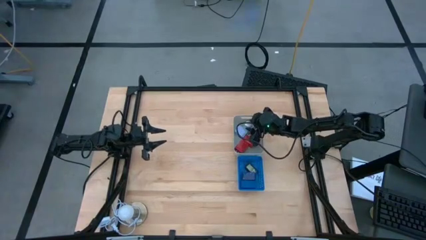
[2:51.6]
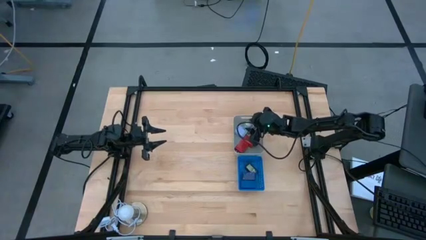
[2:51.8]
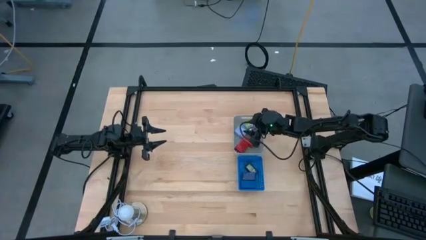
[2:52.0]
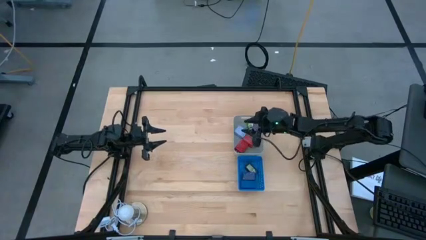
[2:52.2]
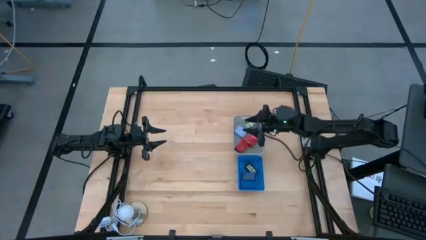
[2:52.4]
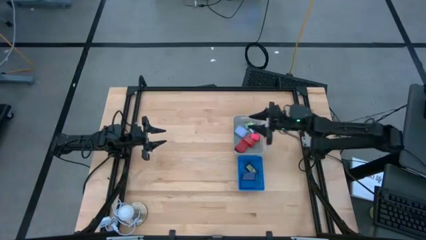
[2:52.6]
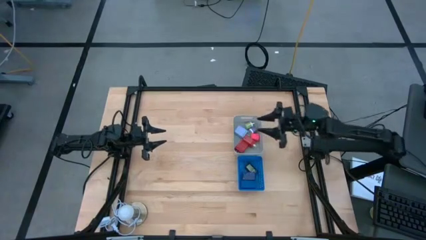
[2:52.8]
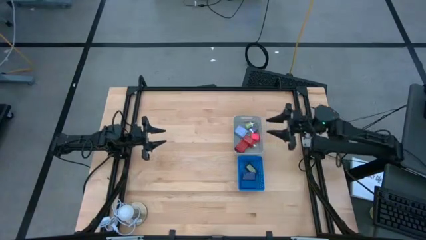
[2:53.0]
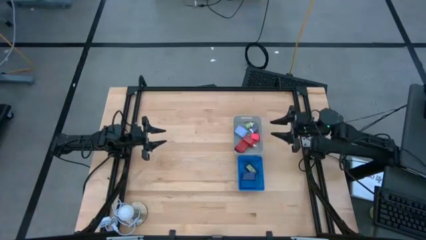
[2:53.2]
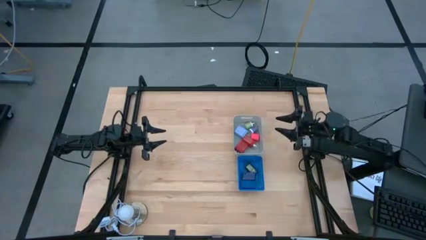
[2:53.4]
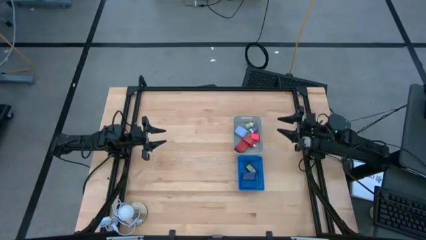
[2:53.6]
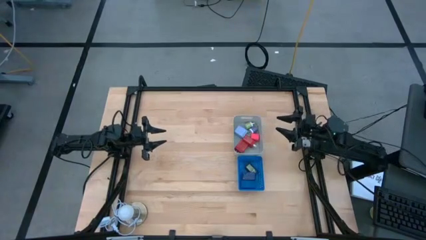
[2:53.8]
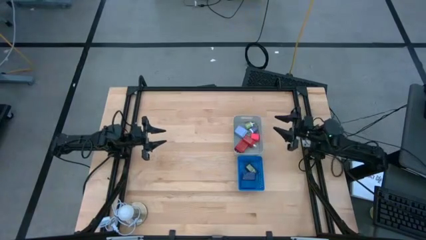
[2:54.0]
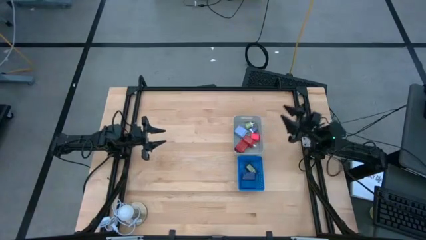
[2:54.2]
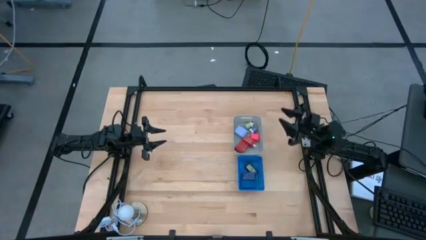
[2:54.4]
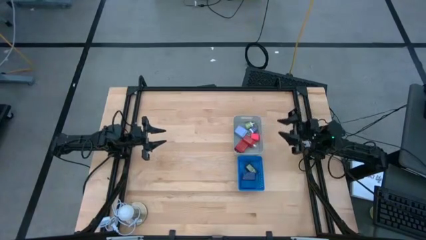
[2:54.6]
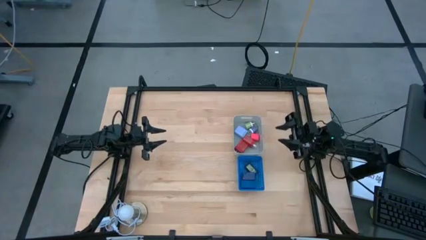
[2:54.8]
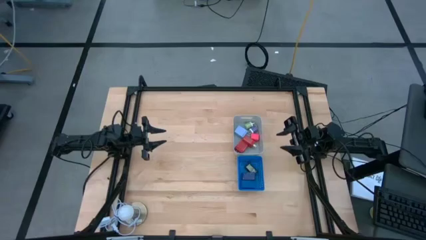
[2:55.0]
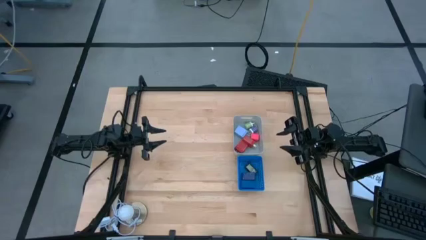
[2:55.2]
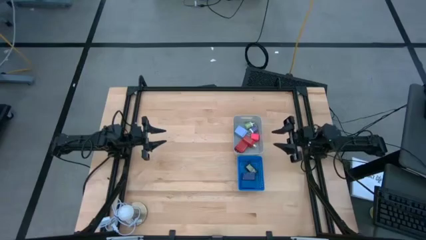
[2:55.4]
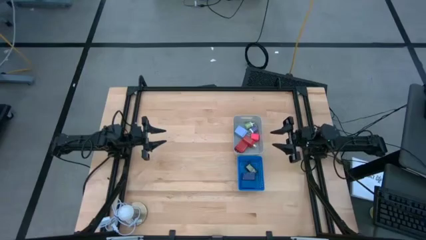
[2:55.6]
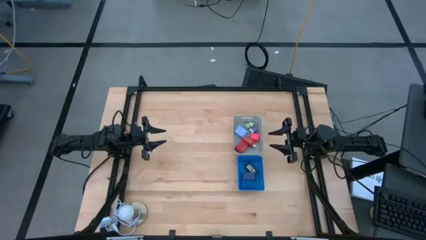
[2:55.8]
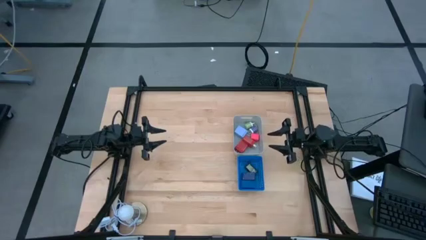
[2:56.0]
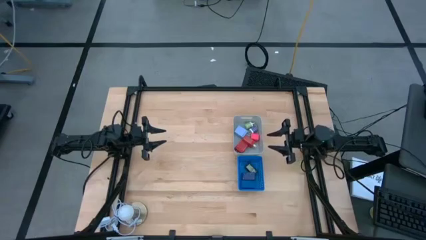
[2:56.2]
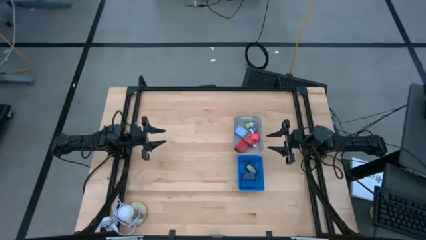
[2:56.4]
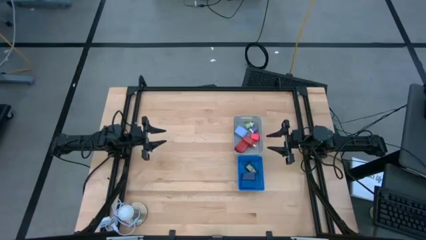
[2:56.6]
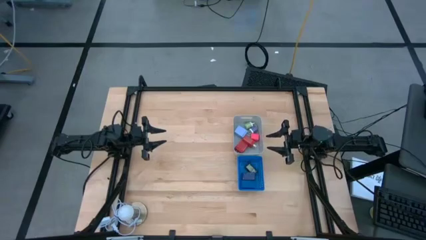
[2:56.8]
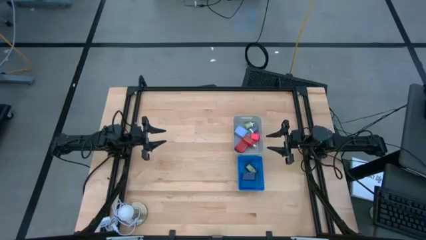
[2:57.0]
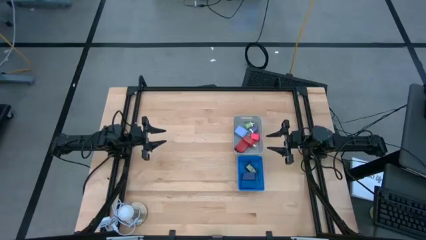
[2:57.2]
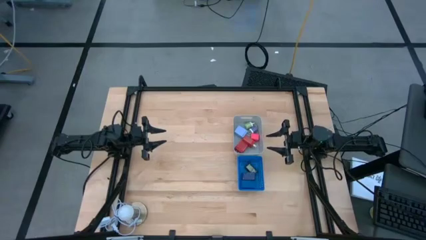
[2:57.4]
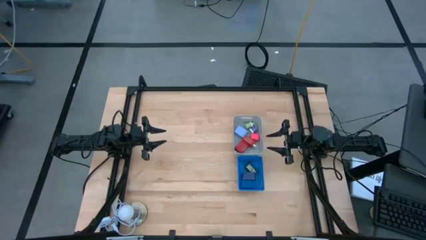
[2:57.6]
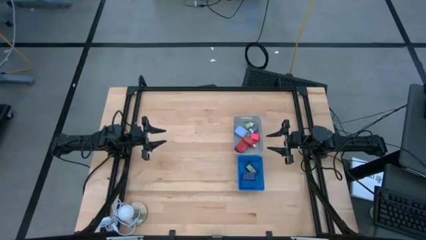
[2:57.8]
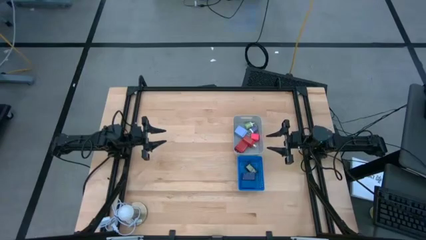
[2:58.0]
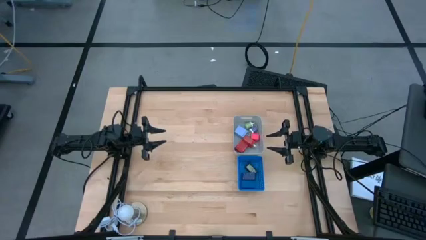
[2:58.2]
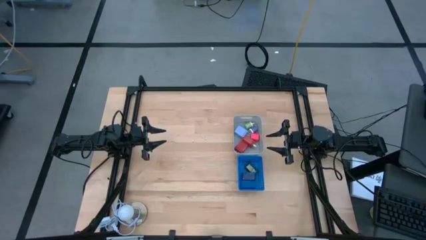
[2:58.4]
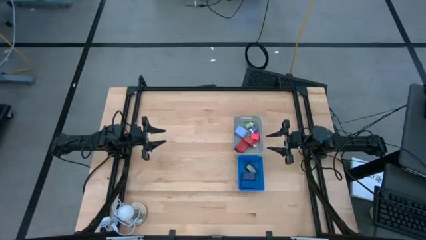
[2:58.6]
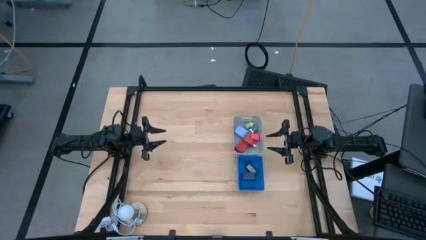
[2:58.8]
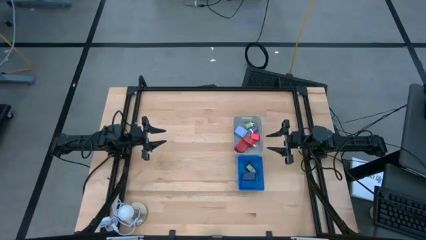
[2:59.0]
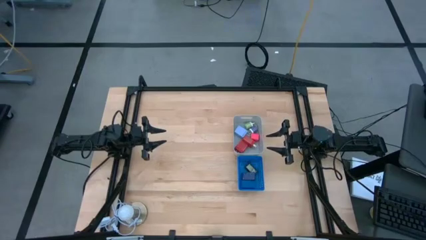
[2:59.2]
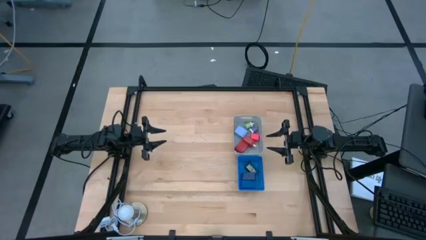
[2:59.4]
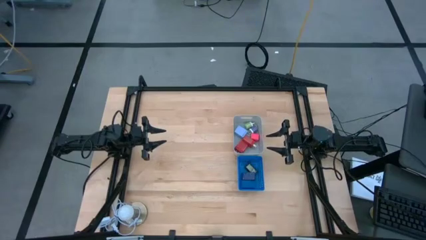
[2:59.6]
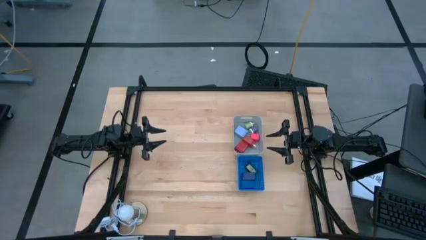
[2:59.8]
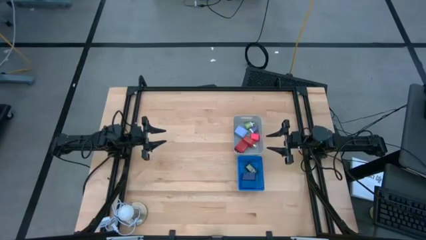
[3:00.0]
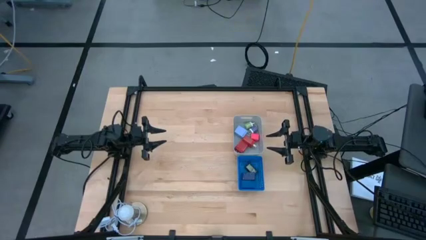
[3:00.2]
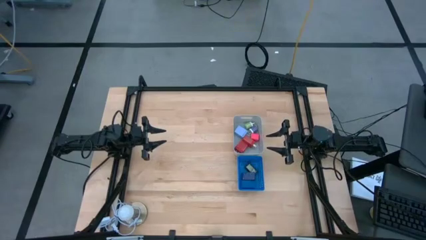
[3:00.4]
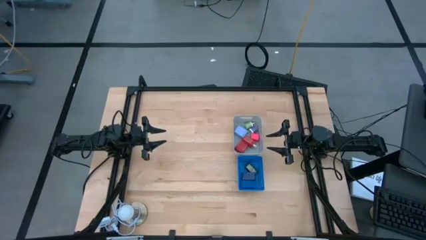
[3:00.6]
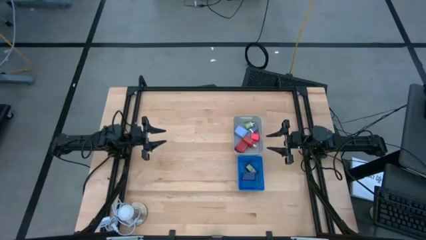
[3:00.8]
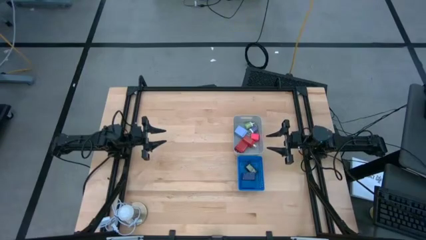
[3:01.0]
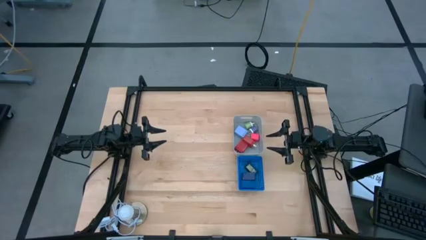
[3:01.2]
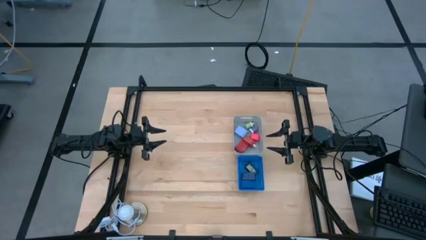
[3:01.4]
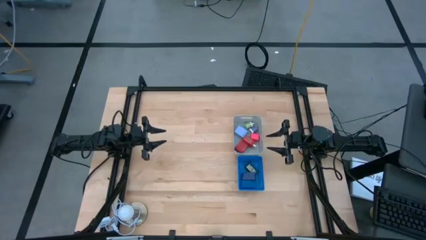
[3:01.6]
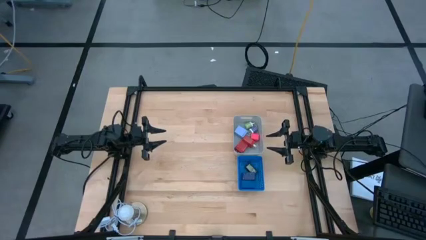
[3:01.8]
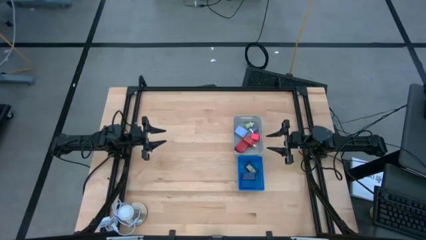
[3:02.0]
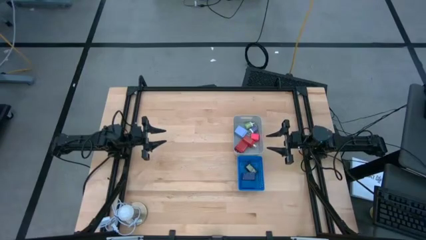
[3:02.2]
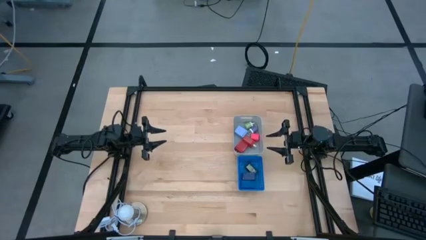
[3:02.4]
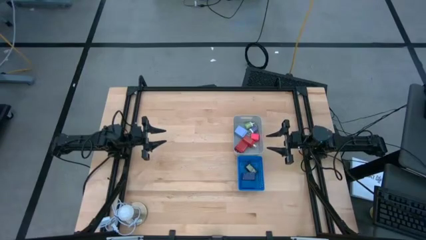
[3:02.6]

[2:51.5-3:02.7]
Task: Pick & Place Office items
Return to Home Position

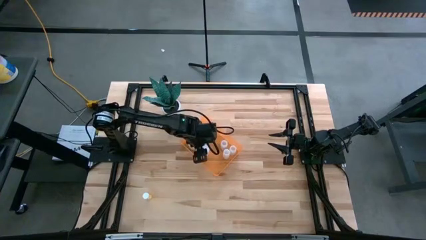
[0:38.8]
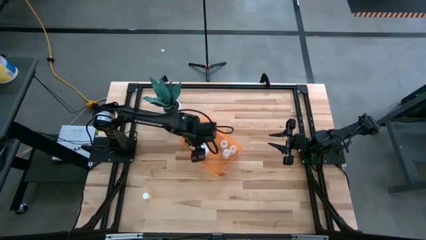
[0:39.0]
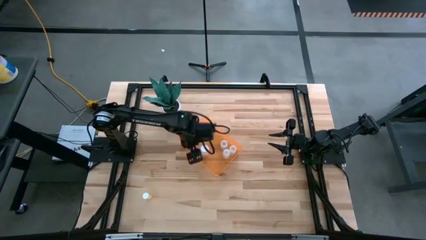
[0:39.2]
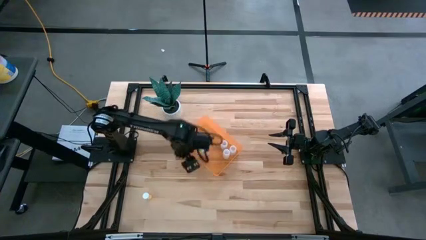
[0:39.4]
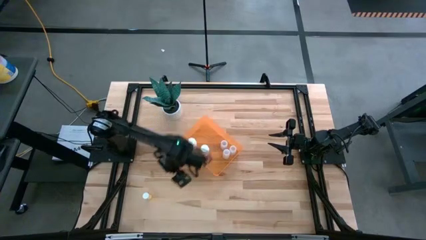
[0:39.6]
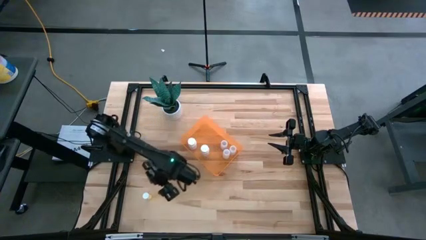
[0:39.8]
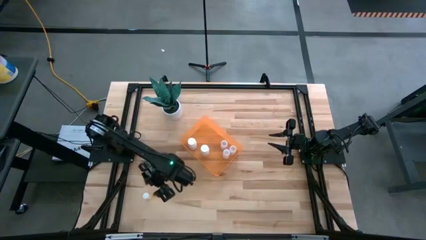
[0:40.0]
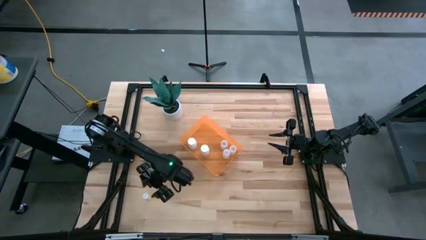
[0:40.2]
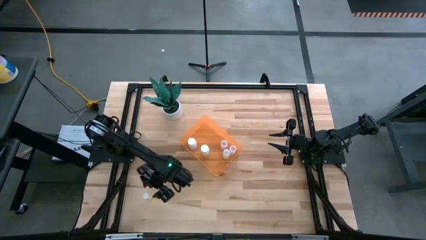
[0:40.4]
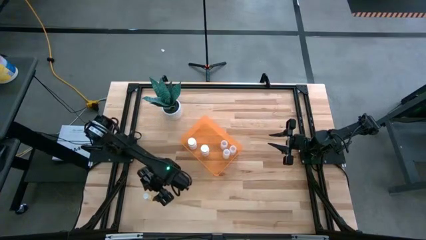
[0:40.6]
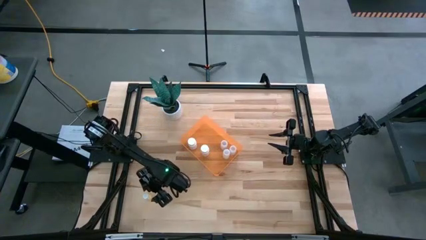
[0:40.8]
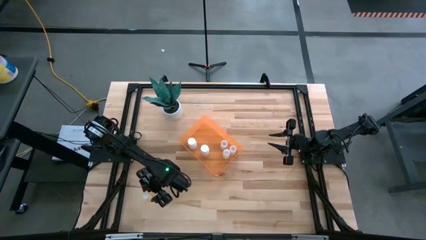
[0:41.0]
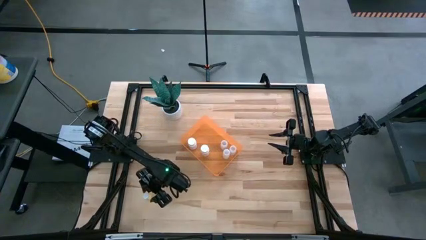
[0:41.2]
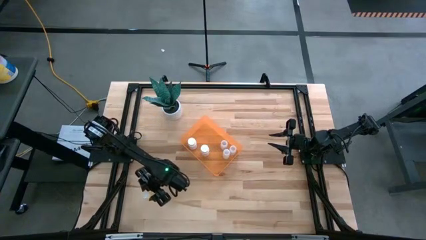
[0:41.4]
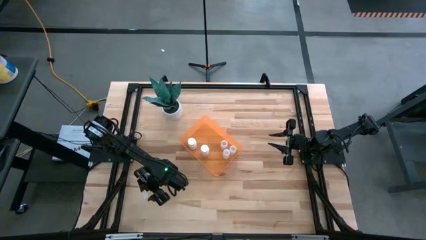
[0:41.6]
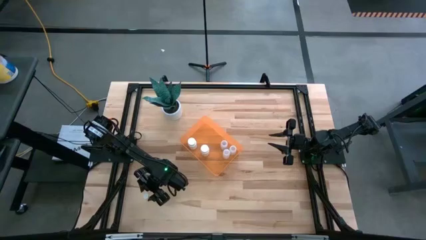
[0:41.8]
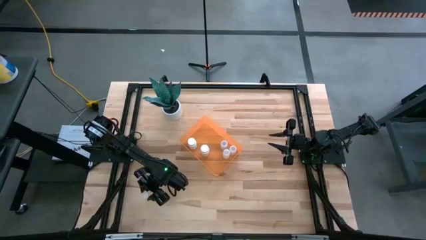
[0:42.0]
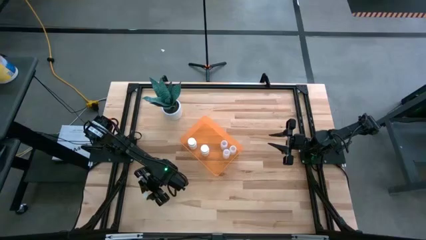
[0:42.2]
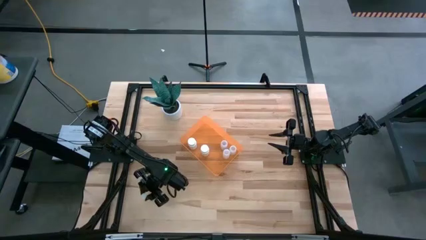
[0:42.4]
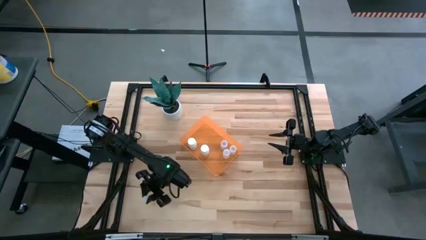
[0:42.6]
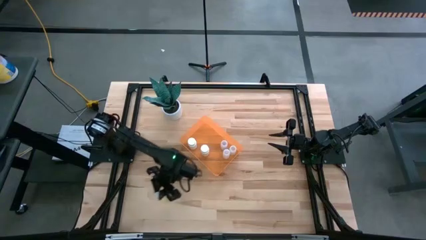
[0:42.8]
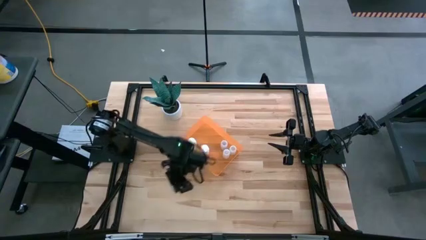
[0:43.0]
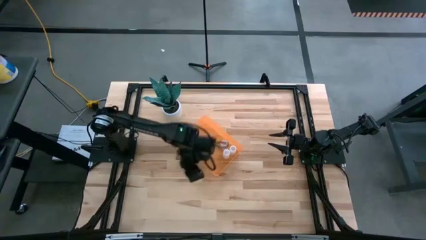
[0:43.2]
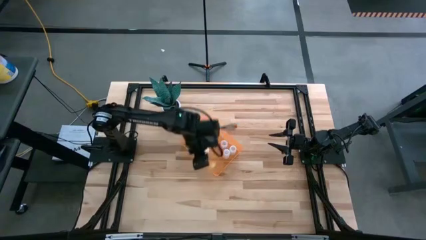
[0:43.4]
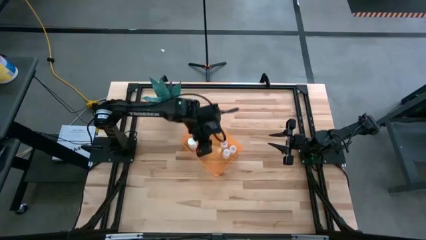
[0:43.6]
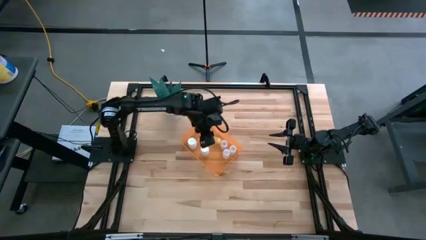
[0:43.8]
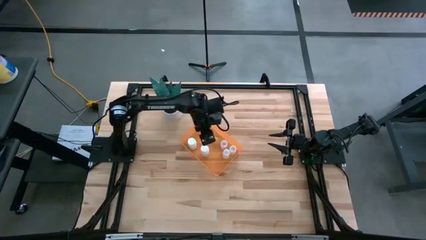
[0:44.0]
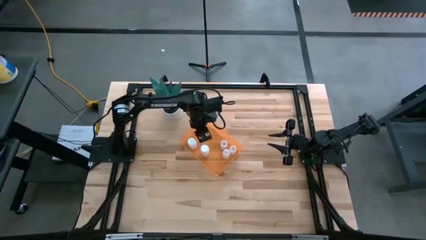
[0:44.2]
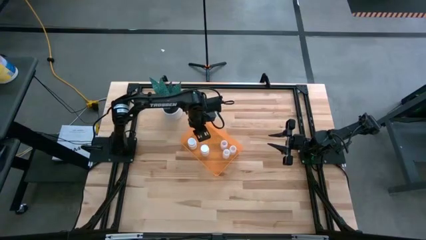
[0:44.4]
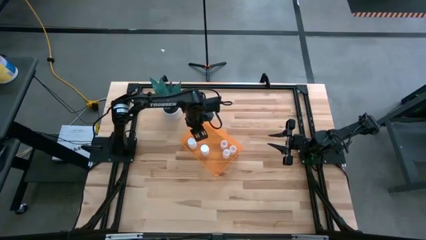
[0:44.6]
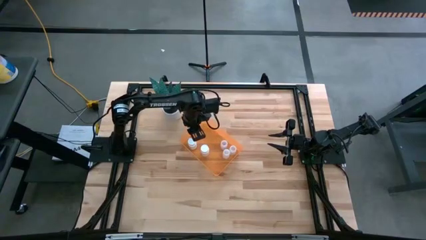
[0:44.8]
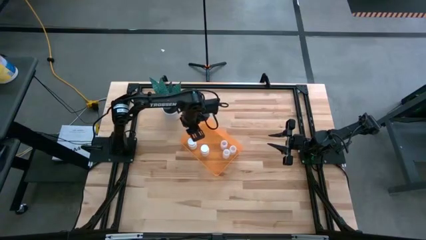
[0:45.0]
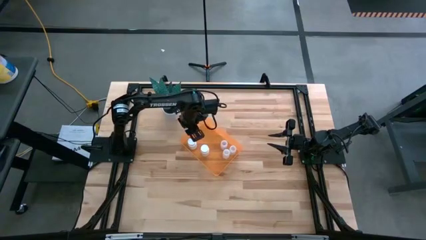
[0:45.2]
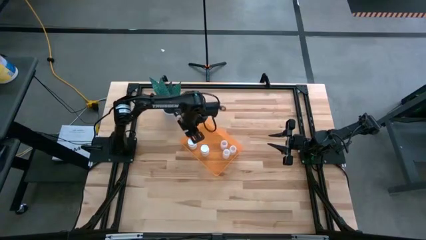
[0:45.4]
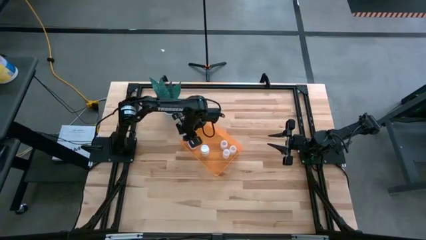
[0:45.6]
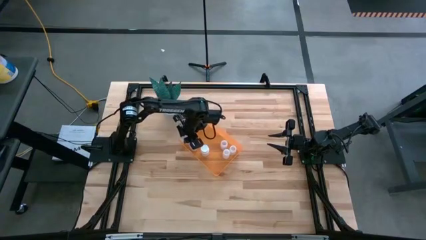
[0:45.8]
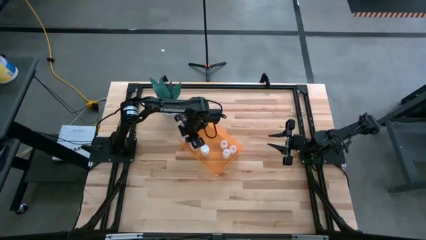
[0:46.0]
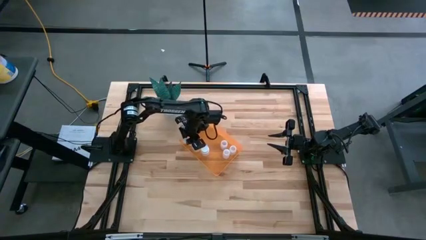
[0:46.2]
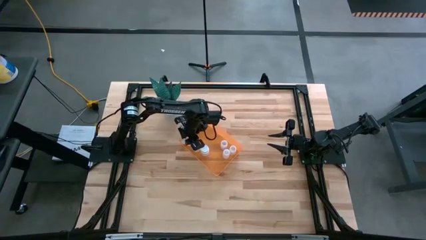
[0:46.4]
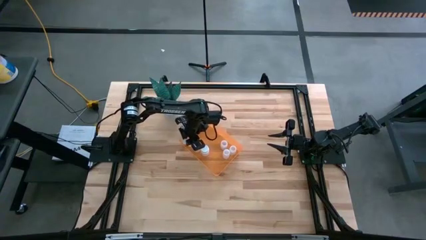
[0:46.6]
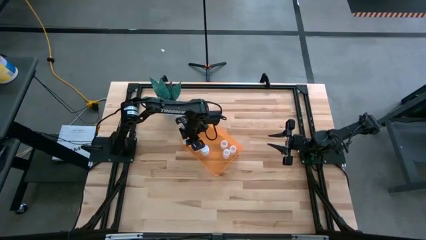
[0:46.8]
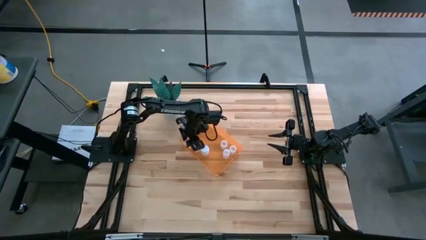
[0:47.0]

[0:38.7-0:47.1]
Task: Pick and place pill bottles into a basket
Put the yellow pill bottle into the transparent orange bin
